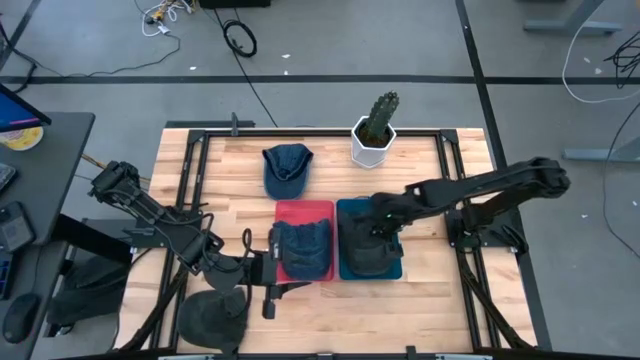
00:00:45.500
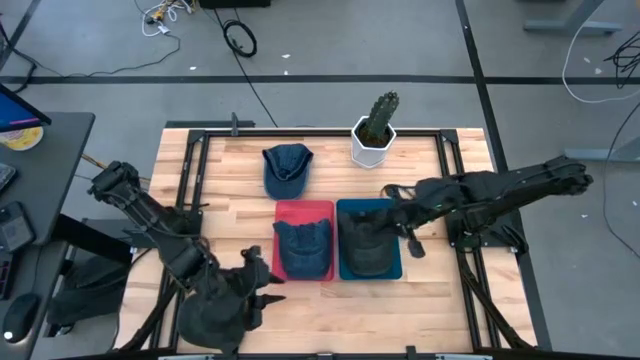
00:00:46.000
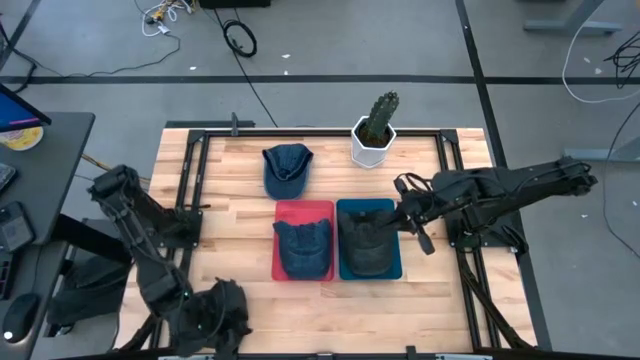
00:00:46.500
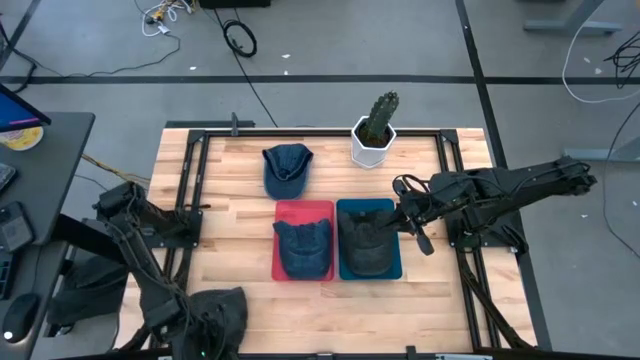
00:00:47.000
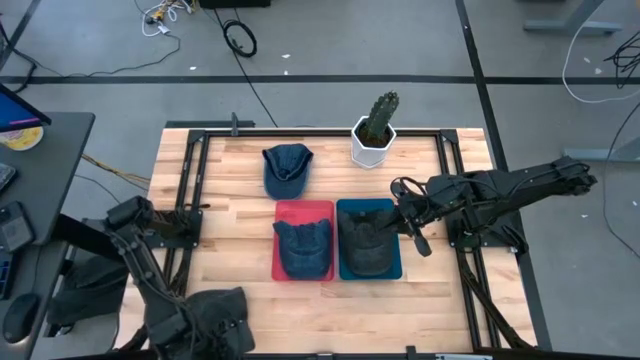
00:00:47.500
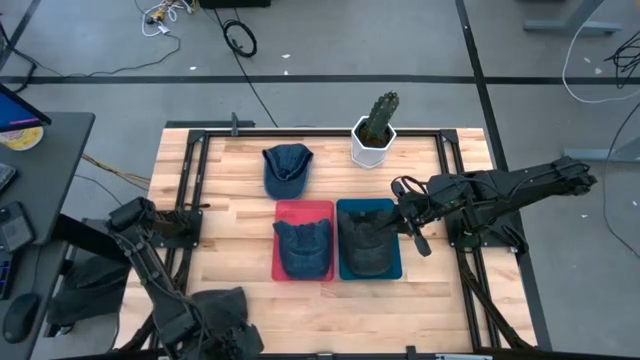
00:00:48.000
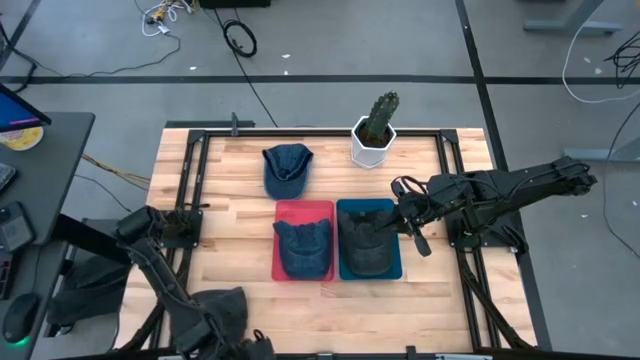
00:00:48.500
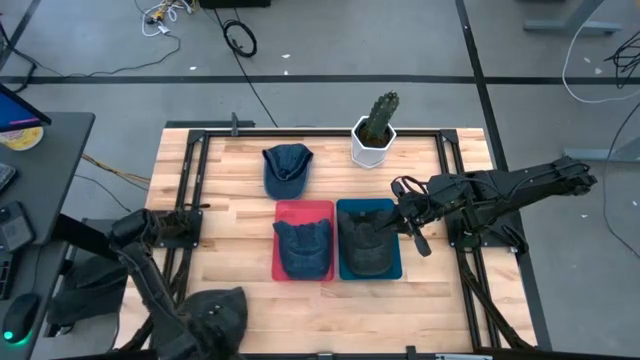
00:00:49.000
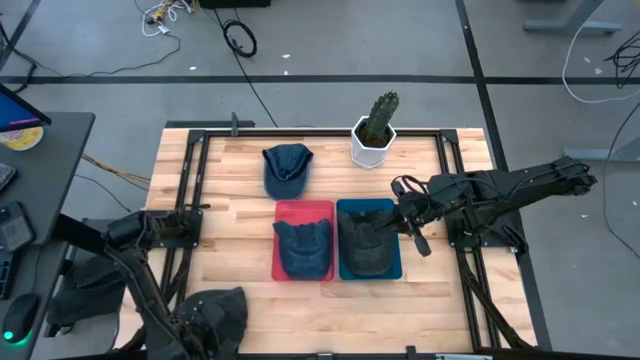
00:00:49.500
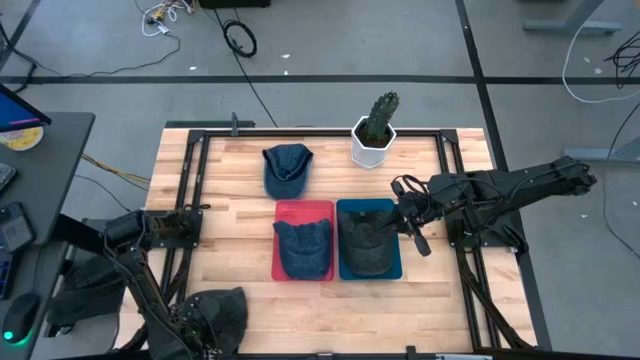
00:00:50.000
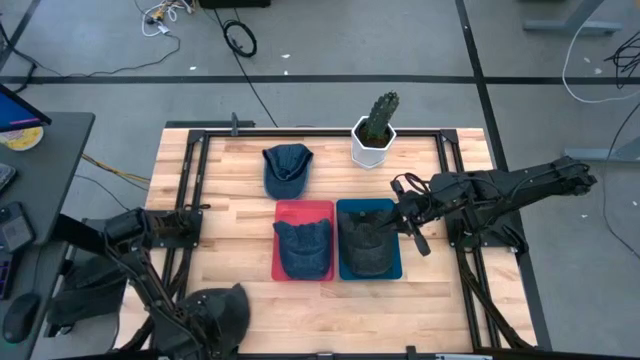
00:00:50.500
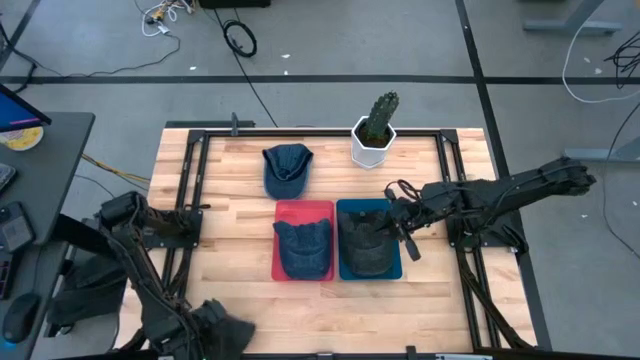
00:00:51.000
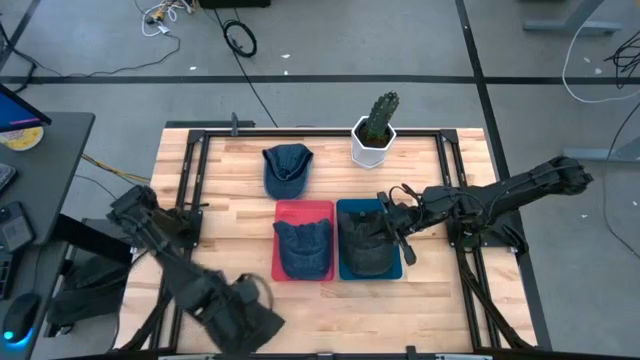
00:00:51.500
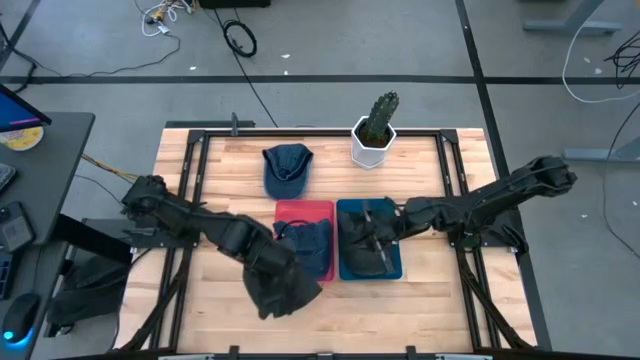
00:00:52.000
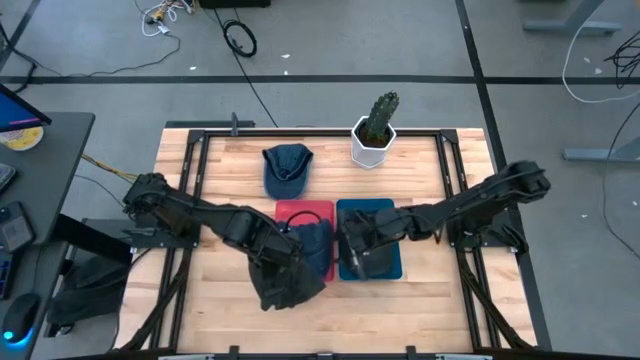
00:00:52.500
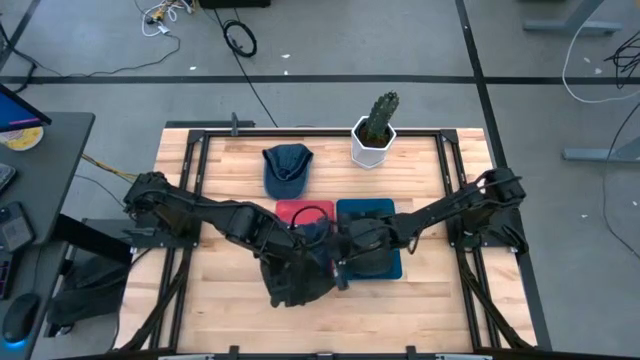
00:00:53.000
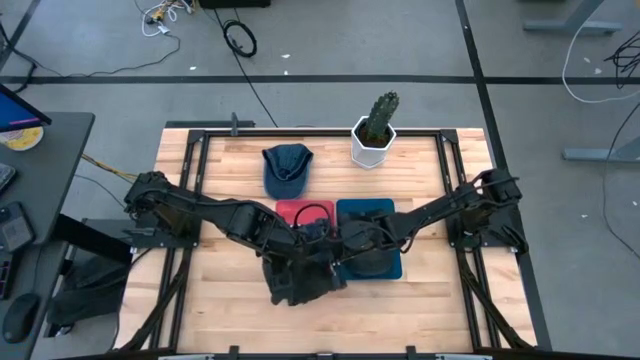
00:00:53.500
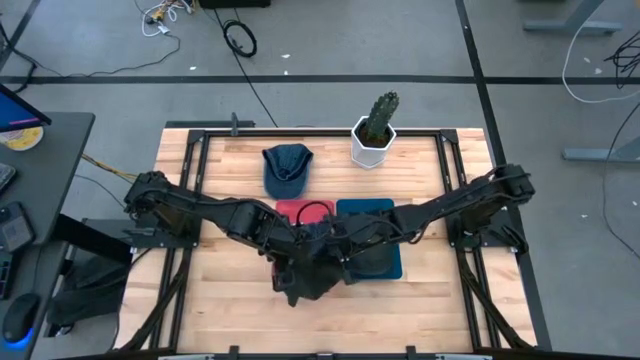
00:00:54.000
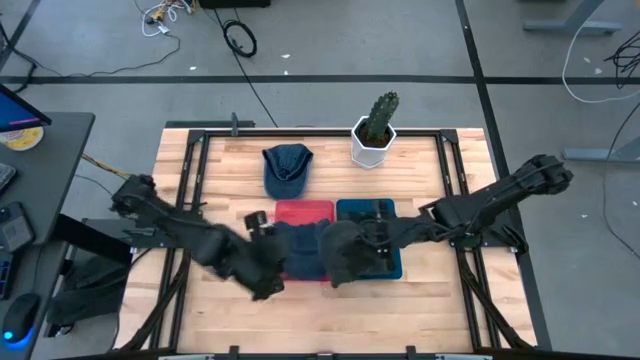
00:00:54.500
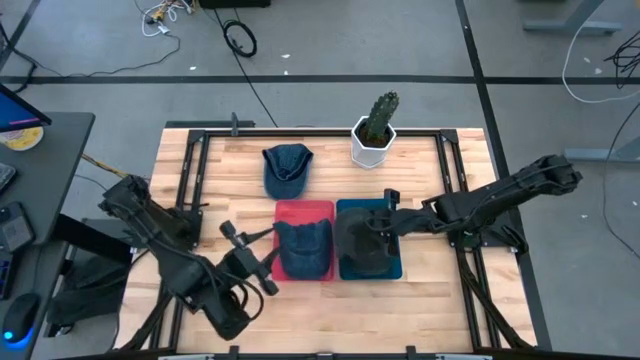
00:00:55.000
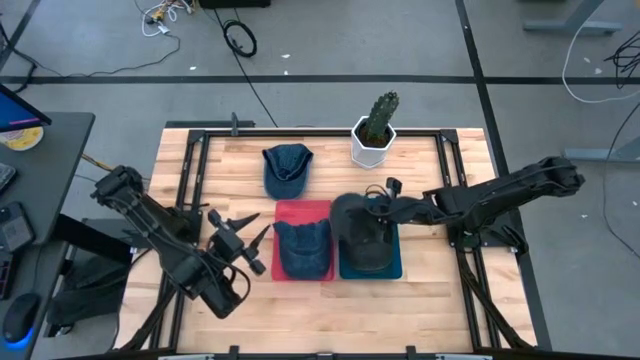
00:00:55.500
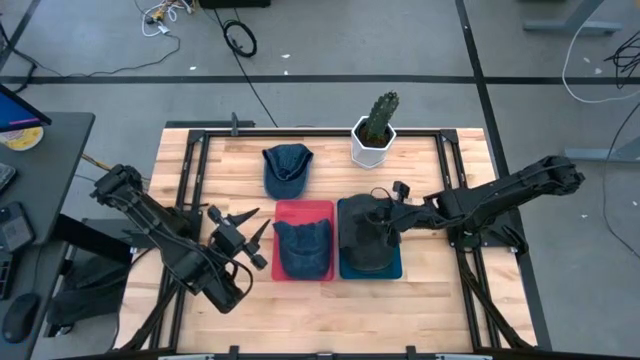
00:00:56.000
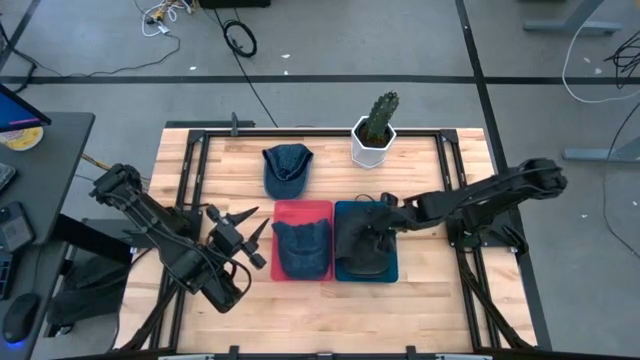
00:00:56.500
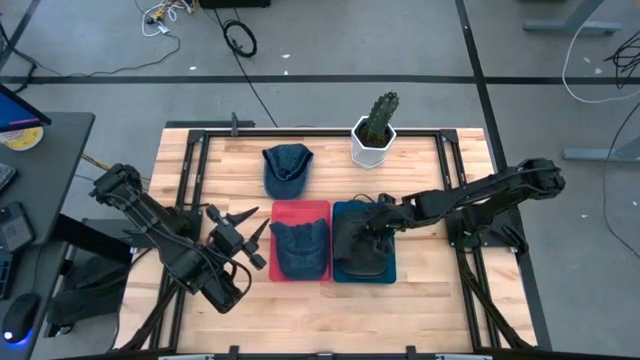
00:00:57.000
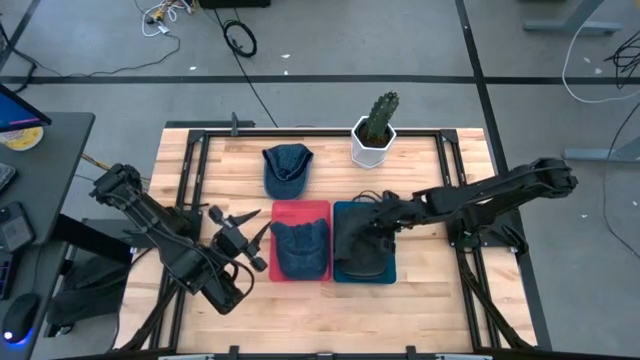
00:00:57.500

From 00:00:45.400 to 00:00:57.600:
Task: Pick & Place hat
Put the gray cap into the blue bin

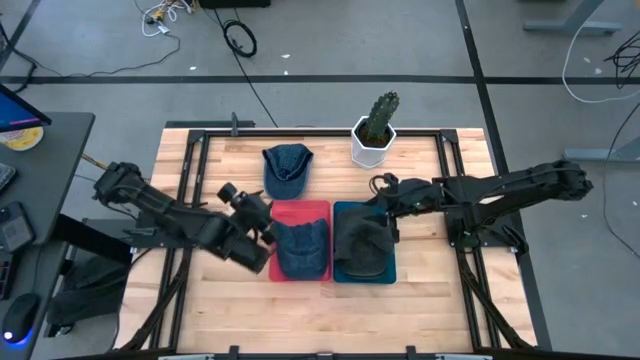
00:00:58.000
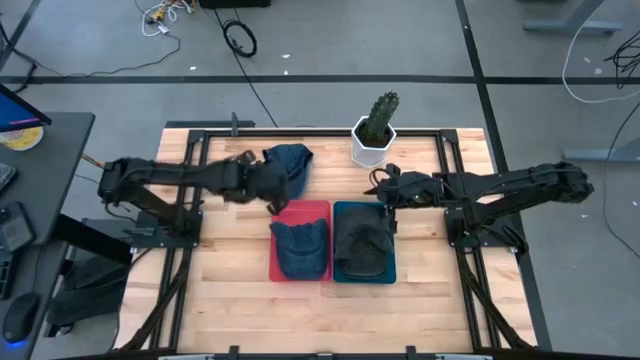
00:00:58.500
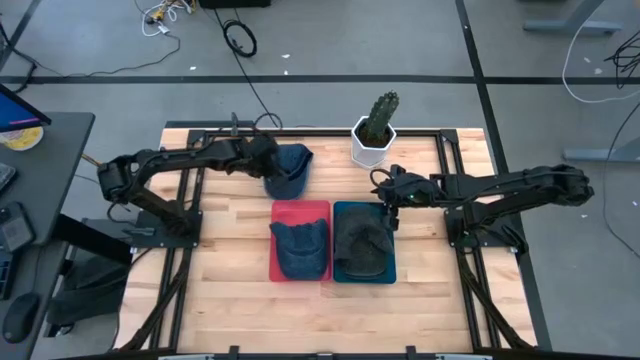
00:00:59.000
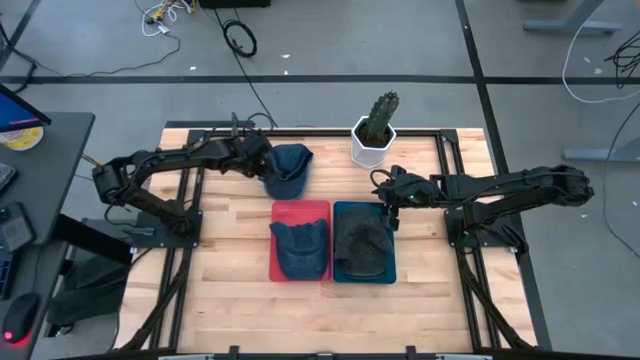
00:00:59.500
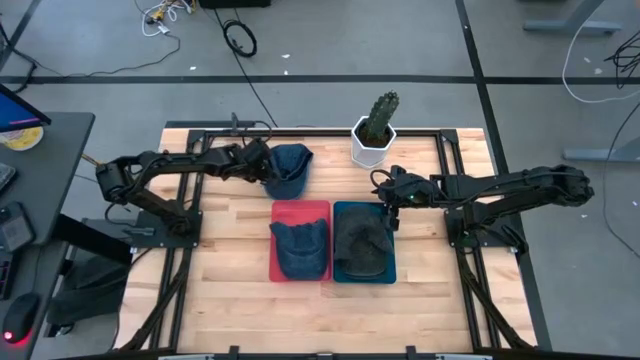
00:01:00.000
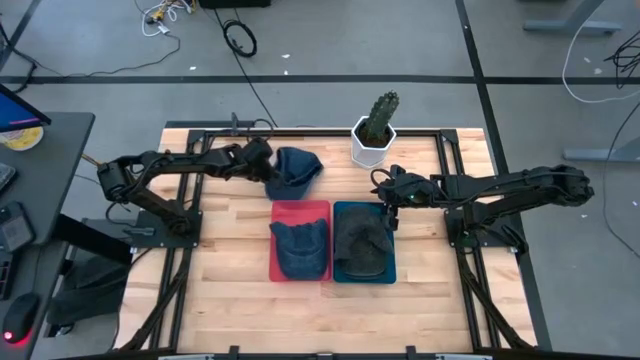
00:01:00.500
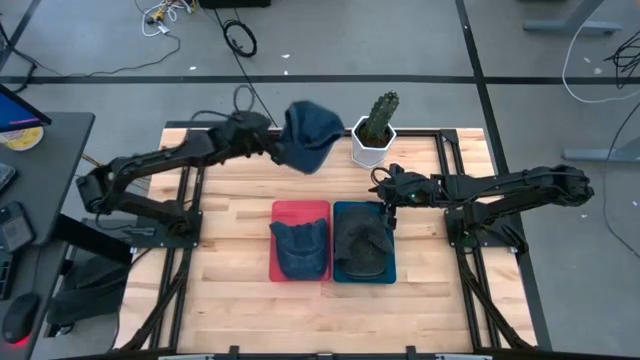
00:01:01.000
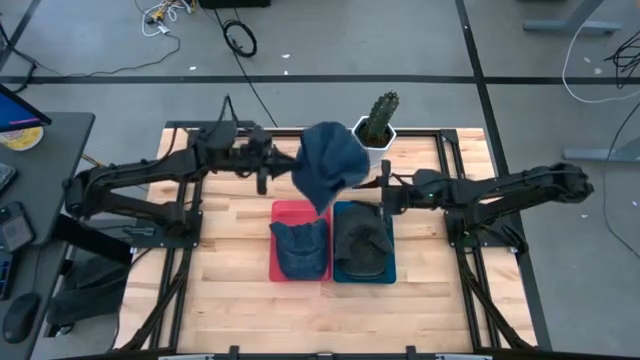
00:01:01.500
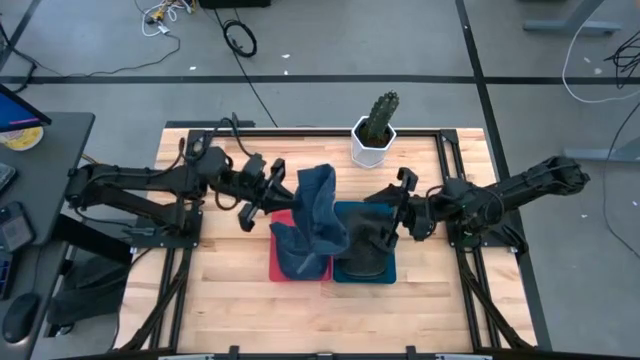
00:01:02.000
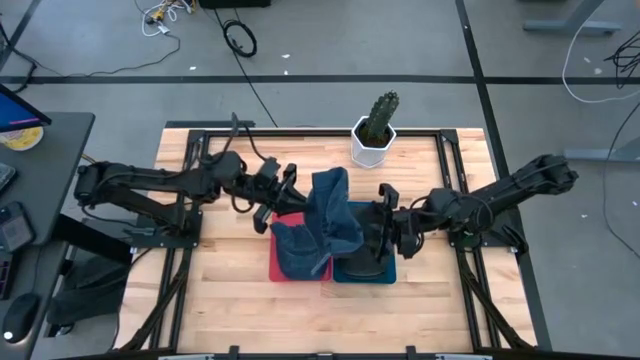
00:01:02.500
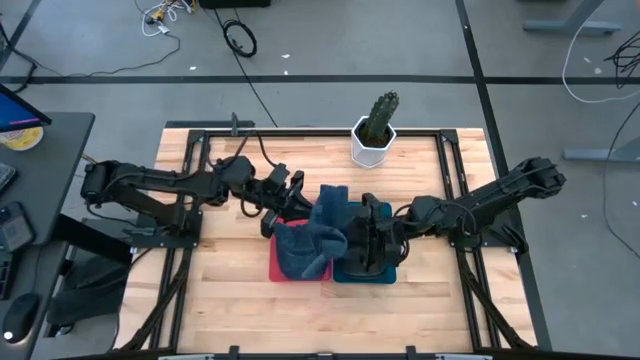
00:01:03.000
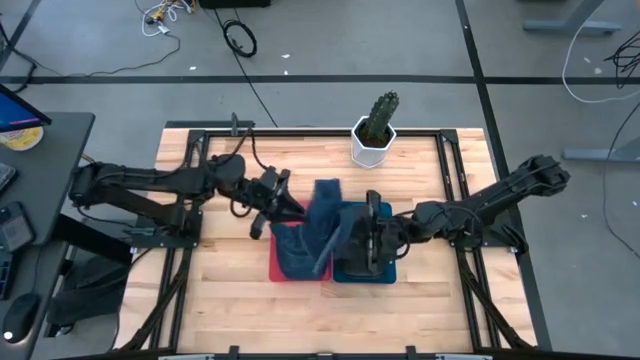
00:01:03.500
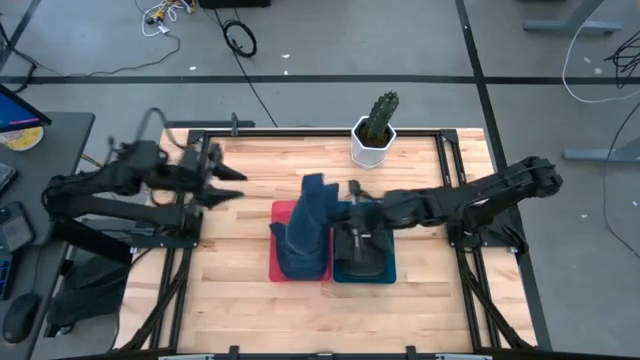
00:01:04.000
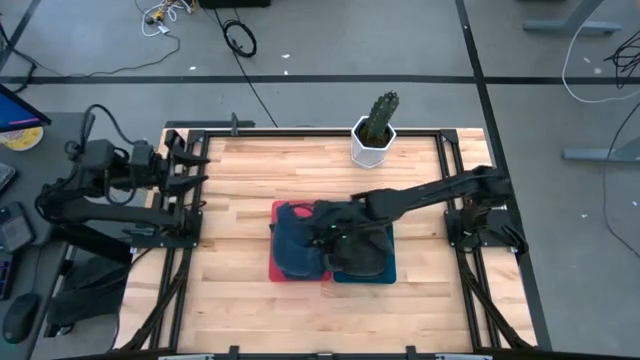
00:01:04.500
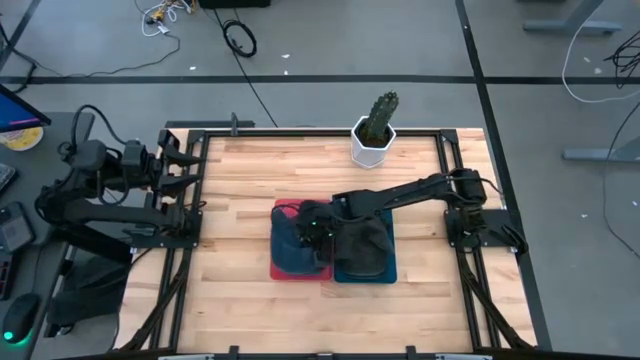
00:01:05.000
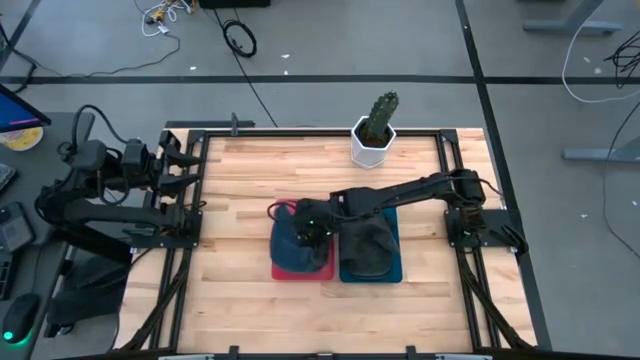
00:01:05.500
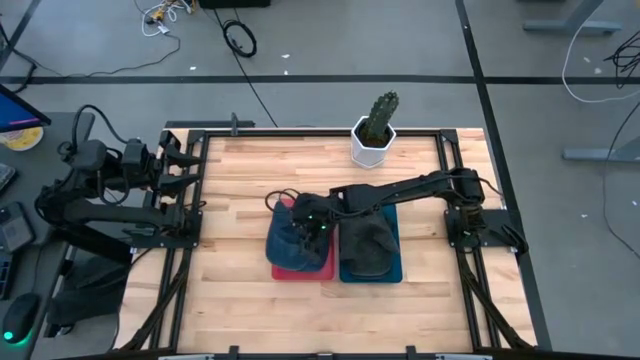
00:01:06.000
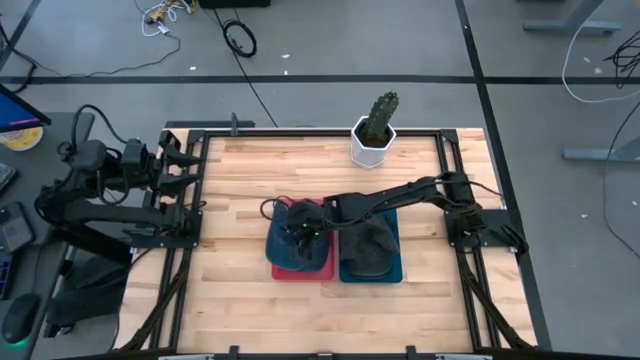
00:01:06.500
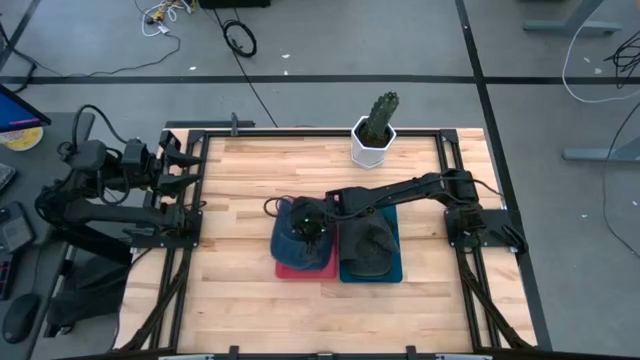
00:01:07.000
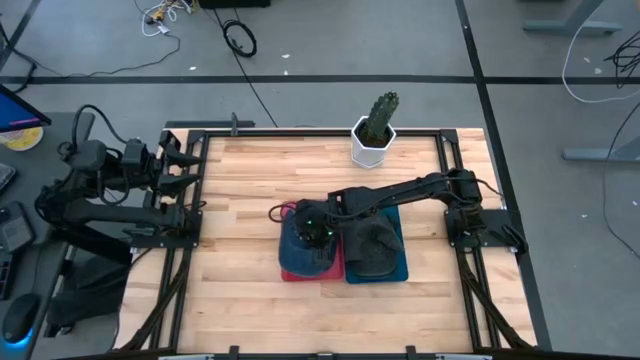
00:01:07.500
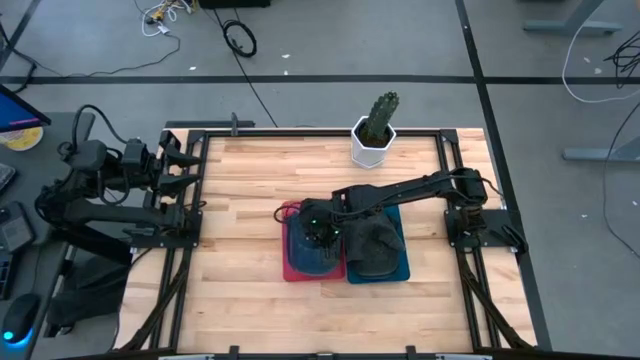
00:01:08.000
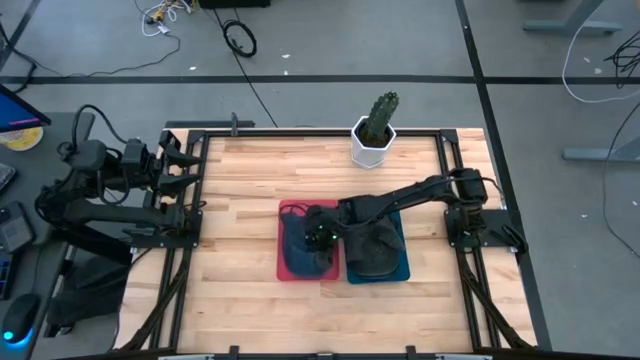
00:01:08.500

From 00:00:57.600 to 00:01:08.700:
Put the dark blue cap into the blue bin
